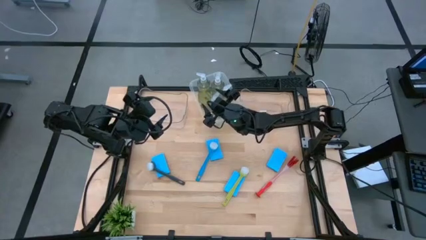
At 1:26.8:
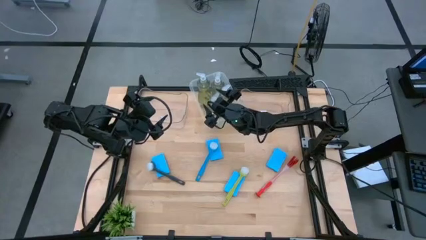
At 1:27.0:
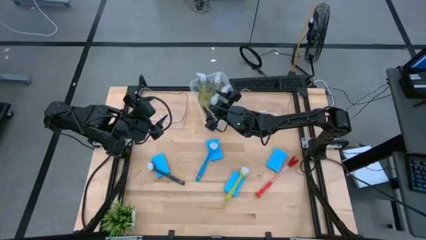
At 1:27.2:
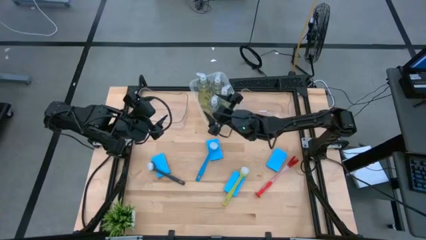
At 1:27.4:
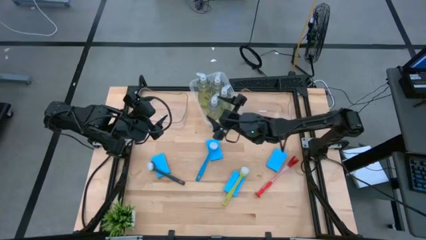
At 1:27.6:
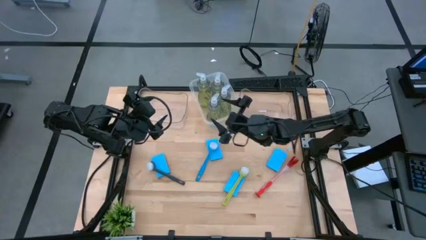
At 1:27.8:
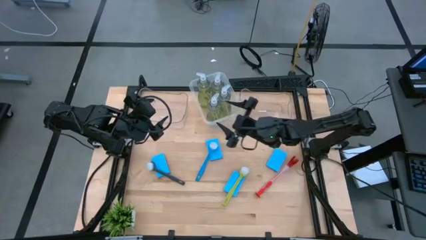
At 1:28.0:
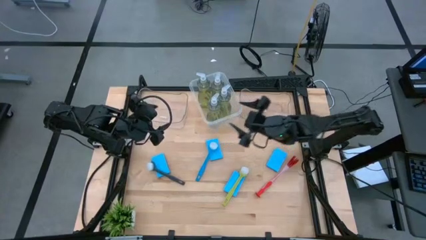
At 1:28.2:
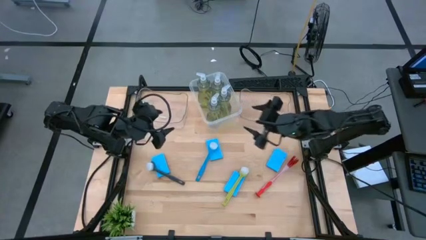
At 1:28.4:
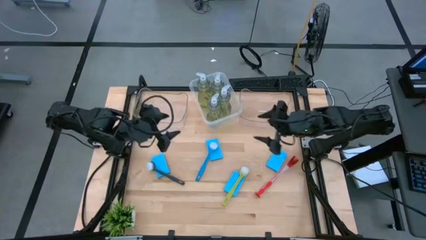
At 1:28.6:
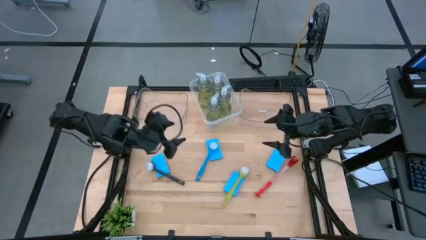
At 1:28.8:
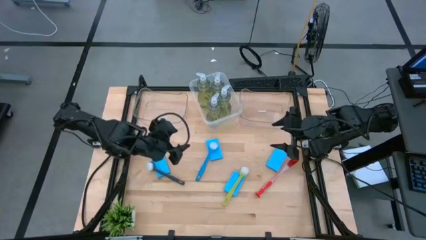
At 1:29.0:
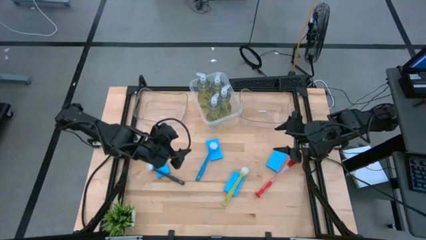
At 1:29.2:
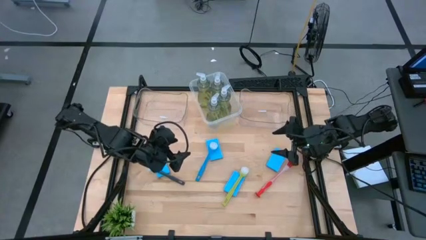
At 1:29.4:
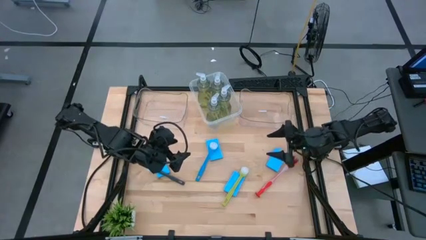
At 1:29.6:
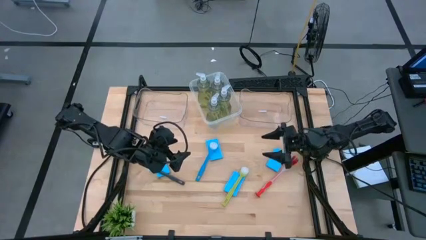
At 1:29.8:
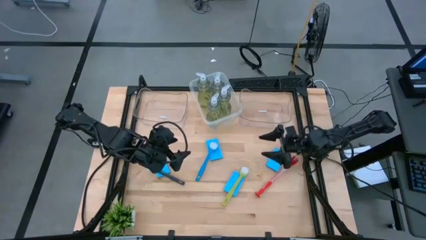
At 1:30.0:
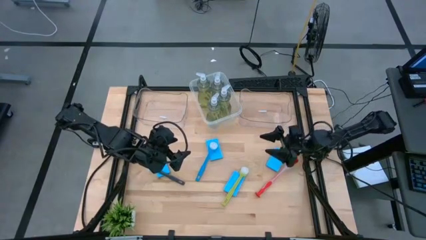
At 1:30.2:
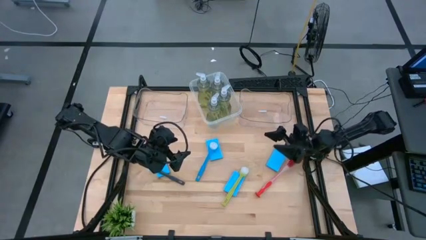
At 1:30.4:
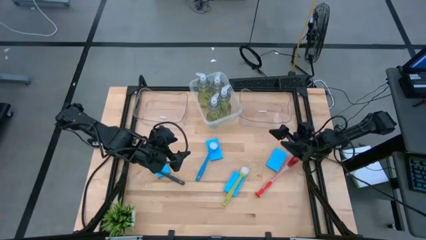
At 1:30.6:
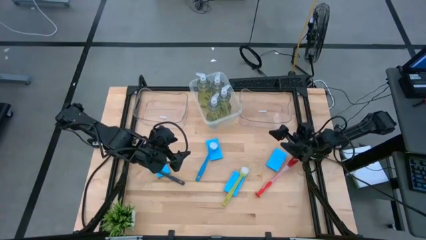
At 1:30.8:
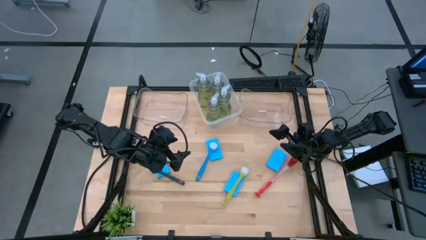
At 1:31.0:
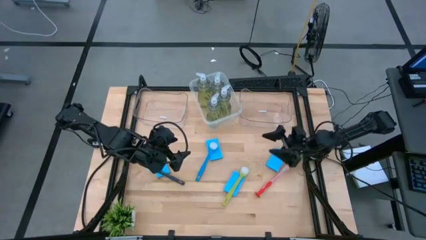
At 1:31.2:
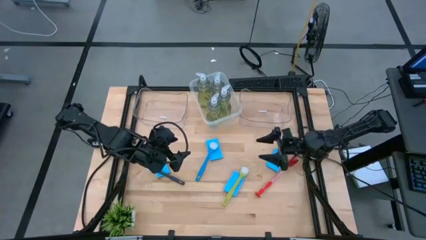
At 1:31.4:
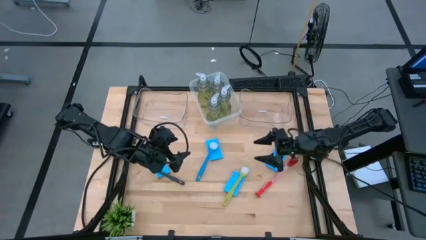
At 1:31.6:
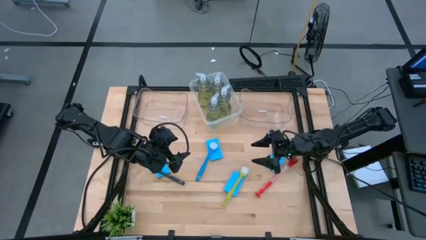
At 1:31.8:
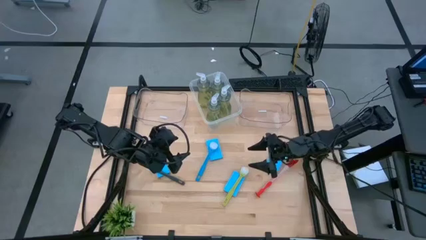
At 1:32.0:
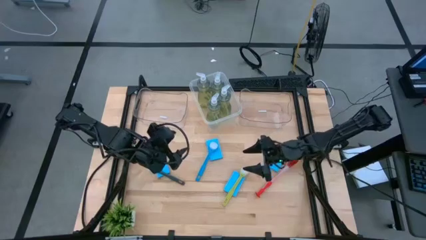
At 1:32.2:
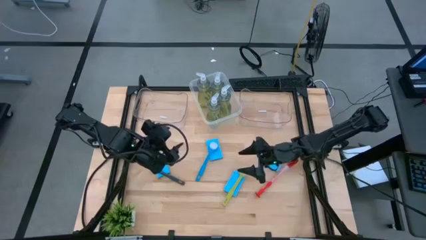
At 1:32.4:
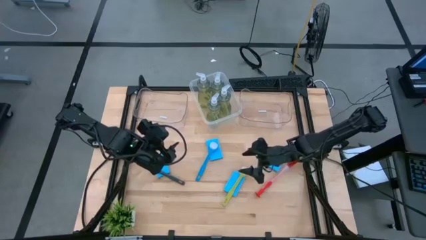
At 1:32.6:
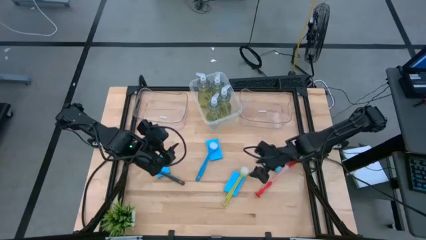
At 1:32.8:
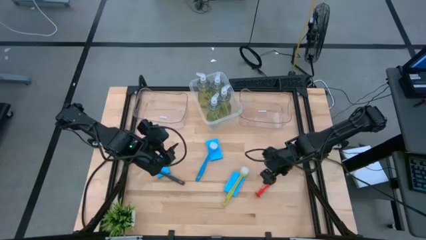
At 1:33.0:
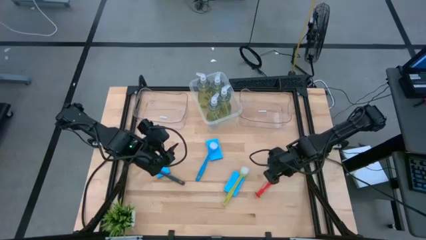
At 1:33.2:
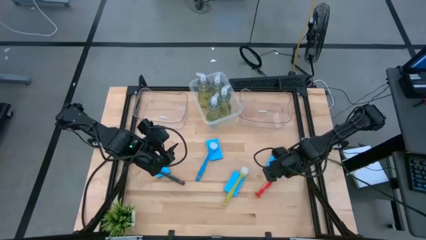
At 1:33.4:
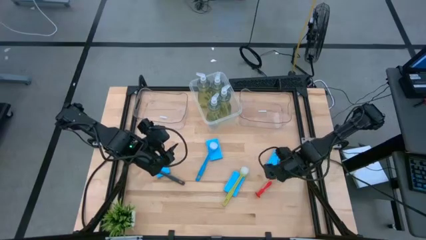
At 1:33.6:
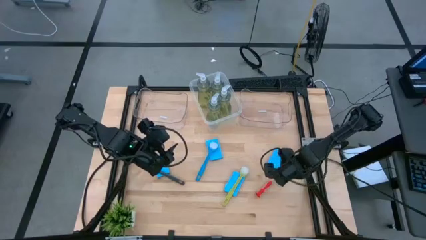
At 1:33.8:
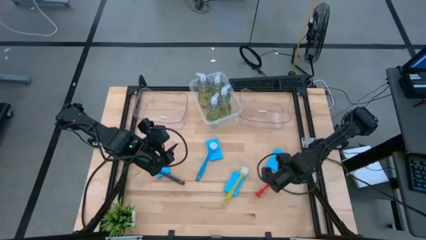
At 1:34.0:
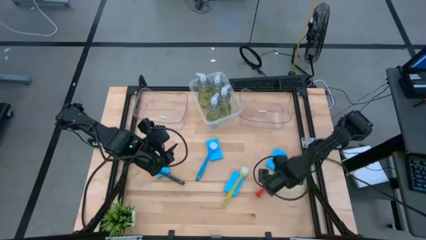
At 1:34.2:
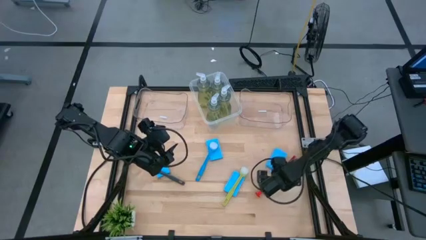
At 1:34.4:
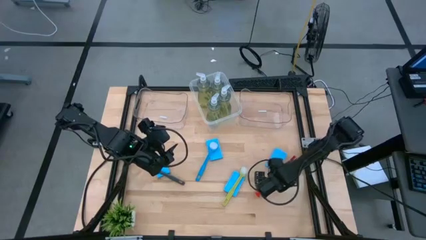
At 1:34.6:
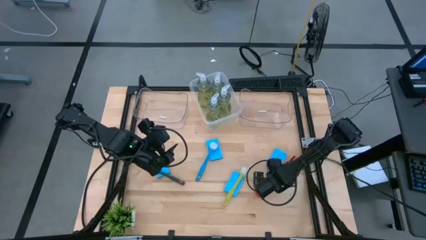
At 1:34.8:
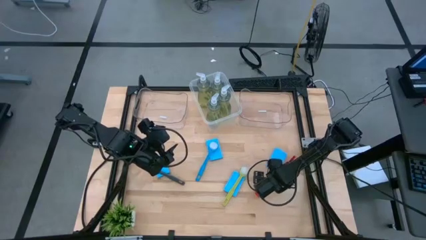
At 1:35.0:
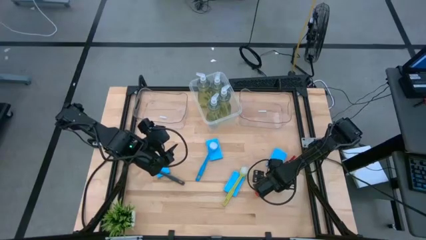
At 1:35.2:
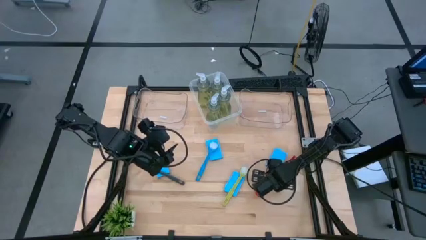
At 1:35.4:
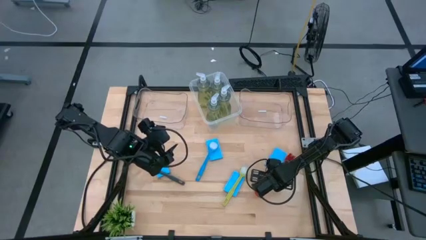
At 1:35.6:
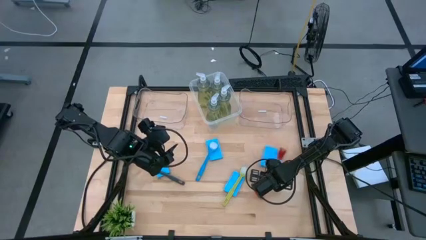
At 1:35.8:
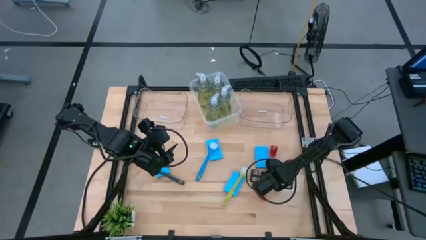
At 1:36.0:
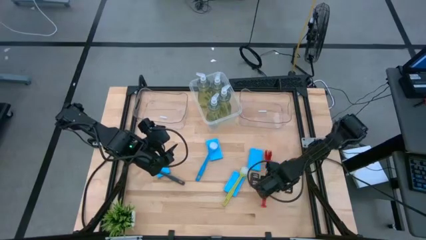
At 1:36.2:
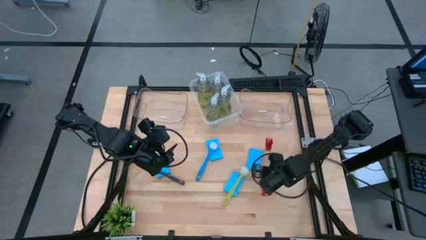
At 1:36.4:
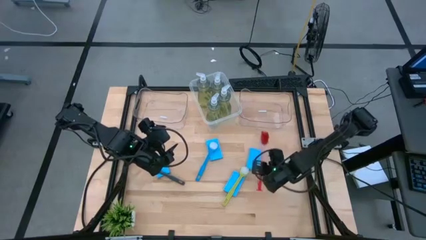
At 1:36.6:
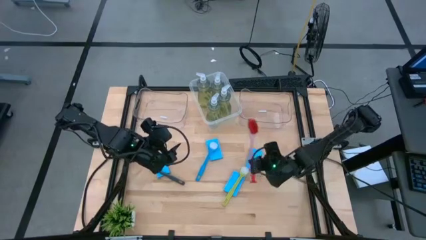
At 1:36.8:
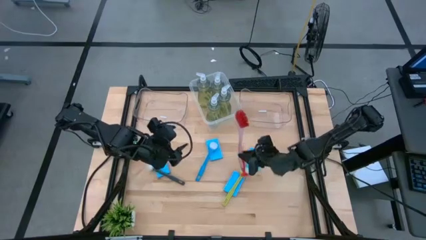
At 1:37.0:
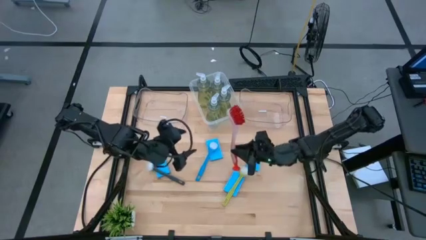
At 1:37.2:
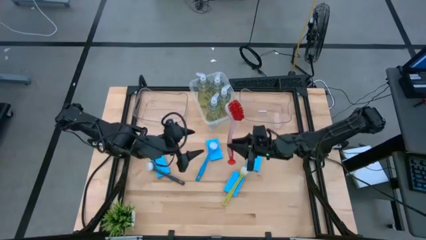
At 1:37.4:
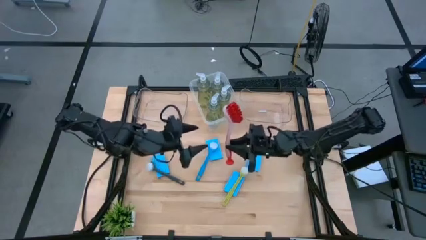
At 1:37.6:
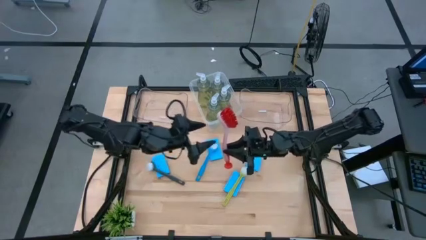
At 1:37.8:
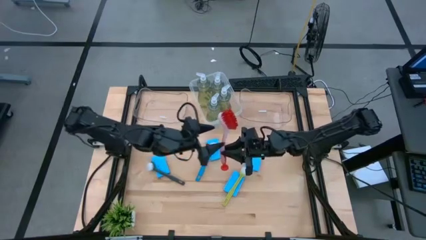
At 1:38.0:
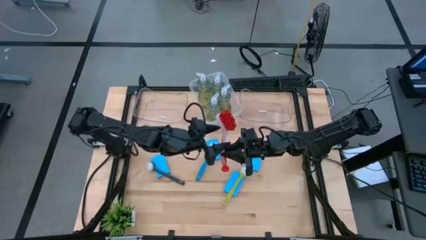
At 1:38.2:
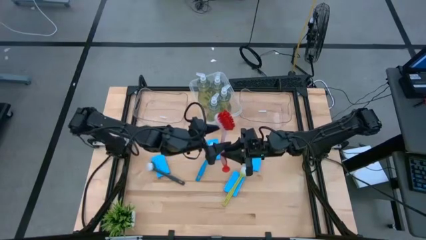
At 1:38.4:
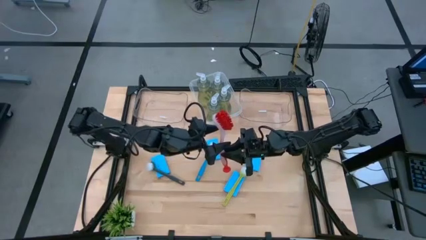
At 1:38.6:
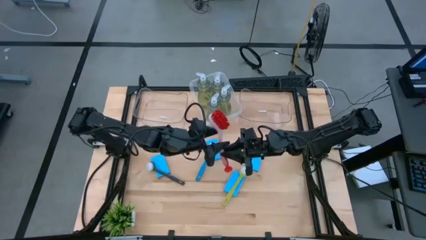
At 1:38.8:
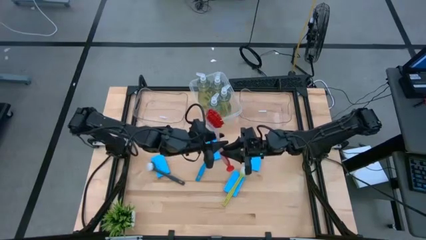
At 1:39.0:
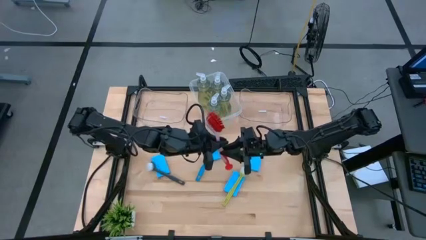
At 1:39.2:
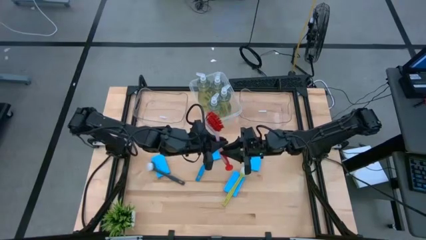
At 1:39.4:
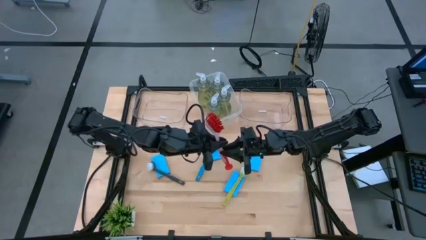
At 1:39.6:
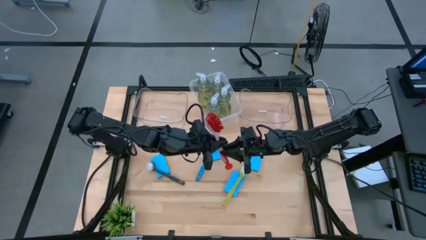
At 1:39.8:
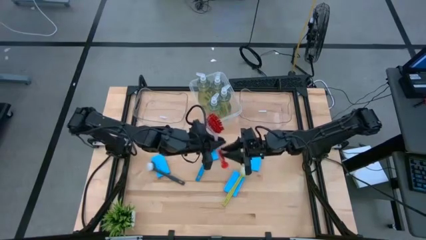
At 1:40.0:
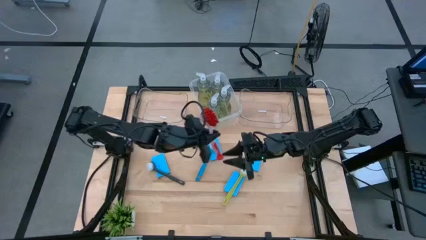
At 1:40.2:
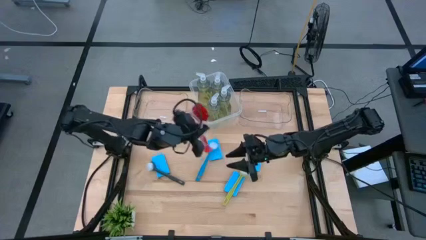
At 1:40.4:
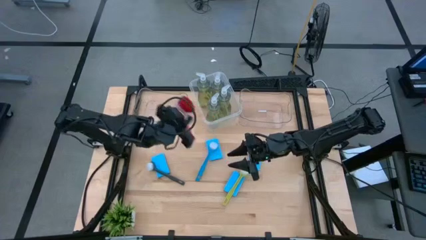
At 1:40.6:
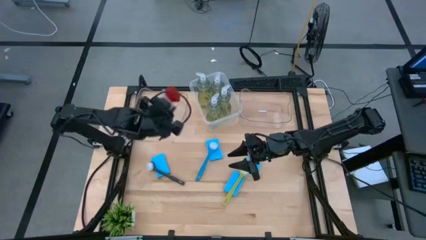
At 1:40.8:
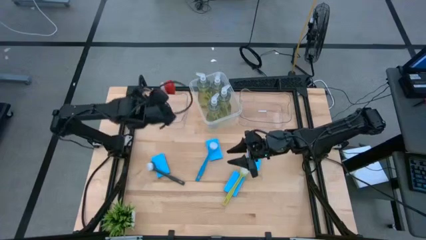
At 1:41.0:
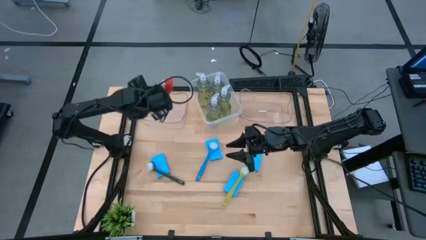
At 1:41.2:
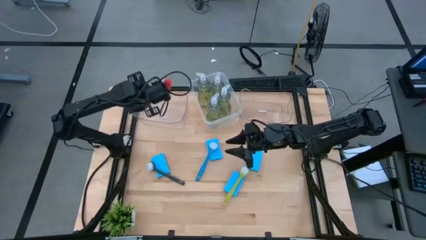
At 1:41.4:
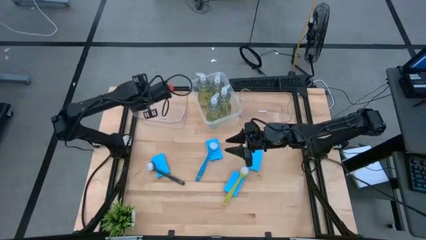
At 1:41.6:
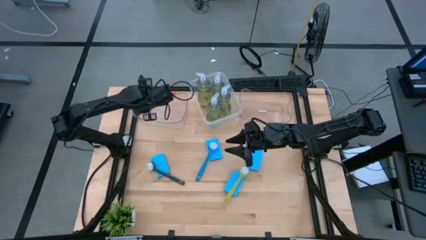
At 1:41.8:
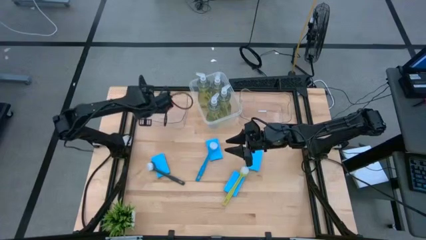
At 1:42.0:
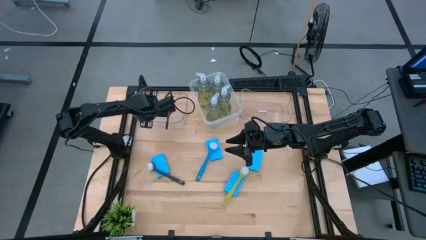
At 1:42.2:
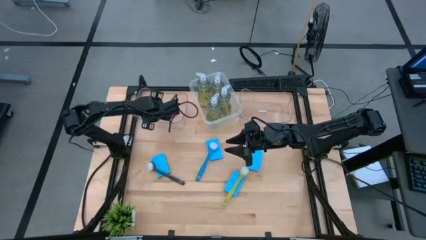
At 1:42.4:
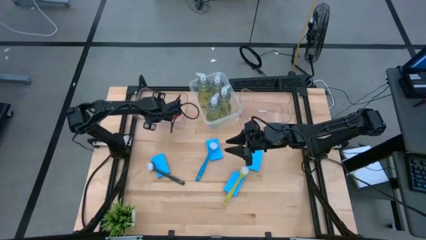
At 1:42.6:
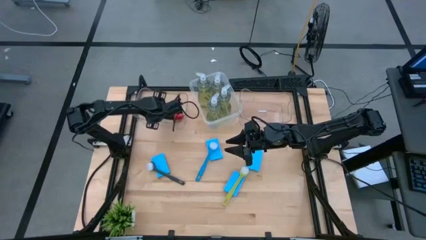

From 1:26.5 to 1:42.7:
Task: Pick & Place Kitchen Sink Supplies
Put the red cleaning brush into the left transparent bin
